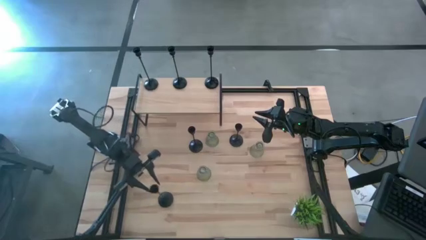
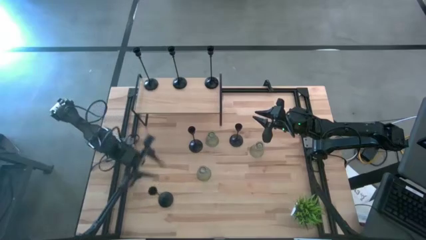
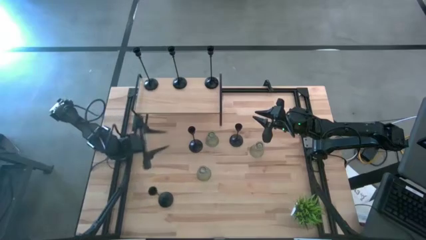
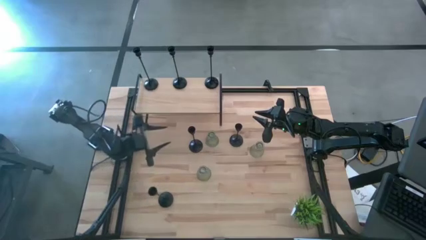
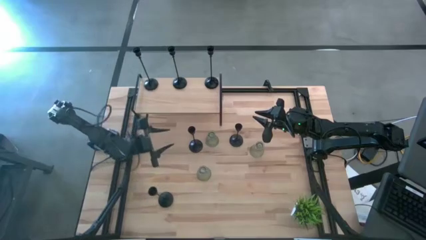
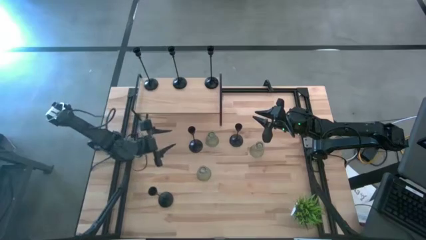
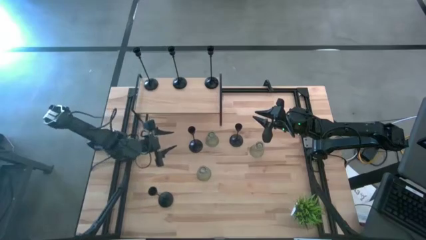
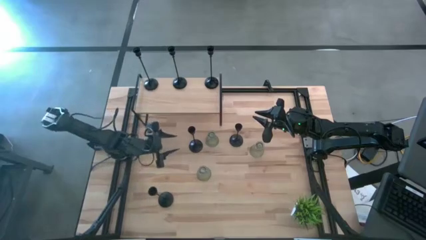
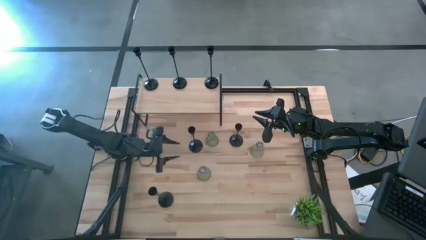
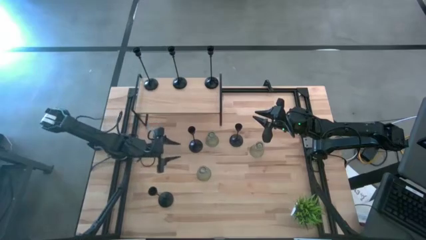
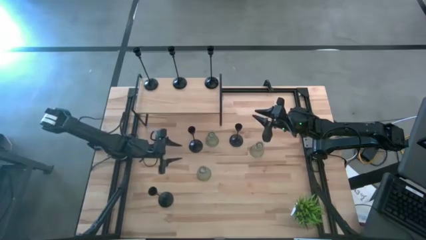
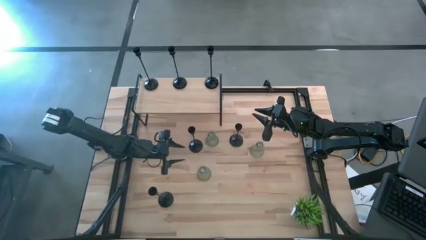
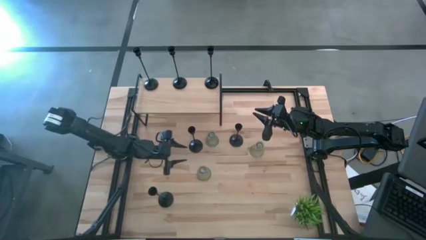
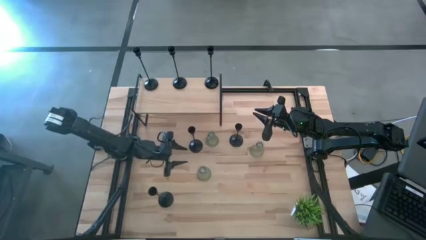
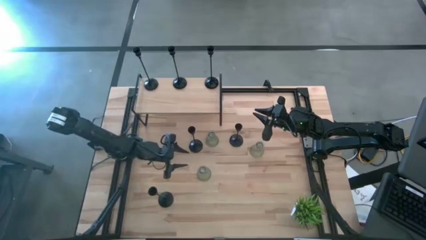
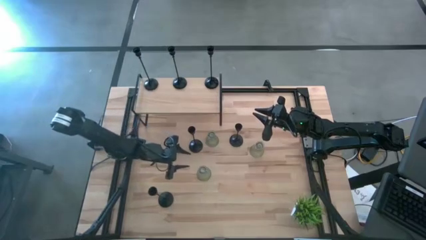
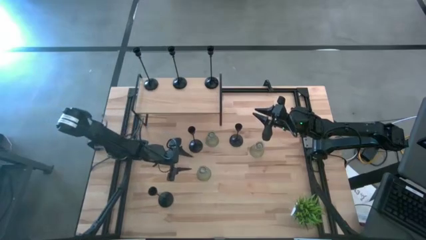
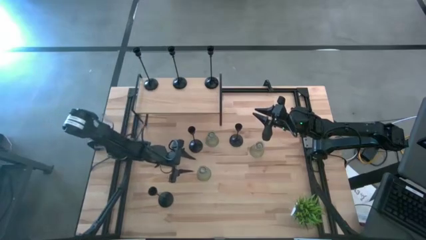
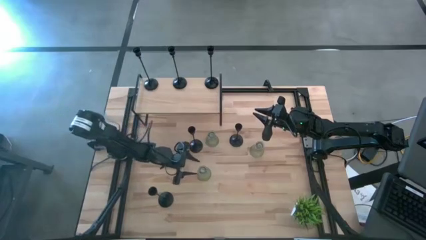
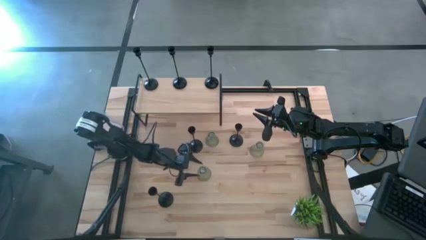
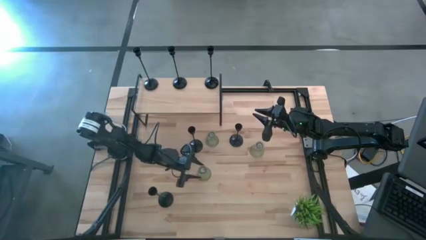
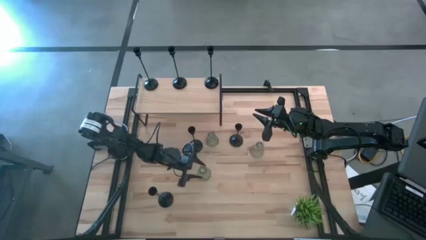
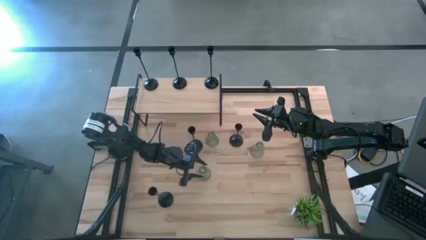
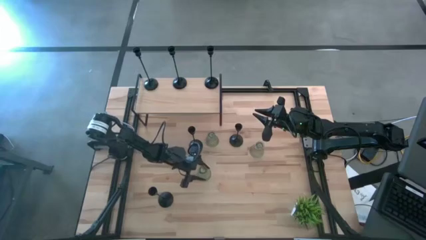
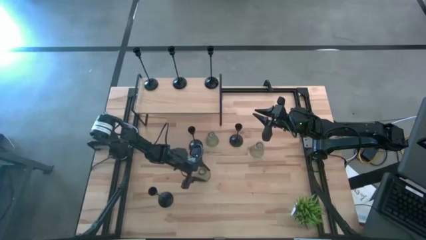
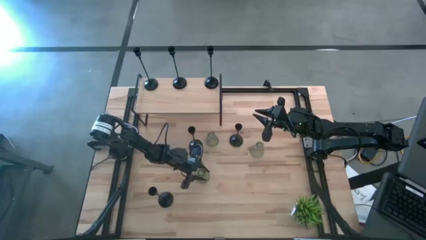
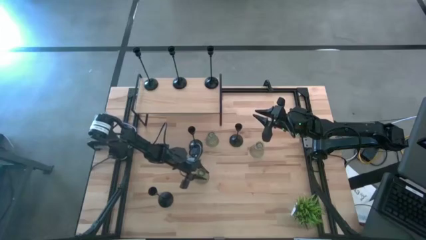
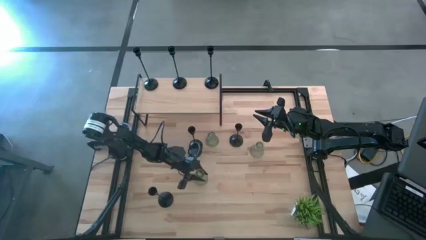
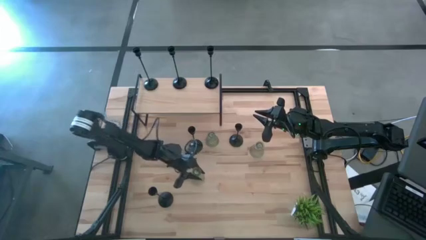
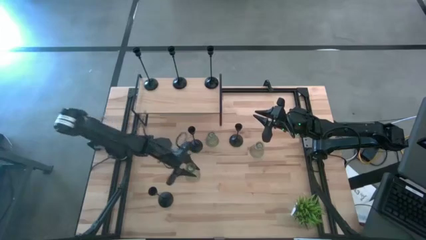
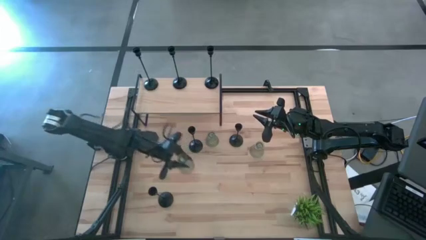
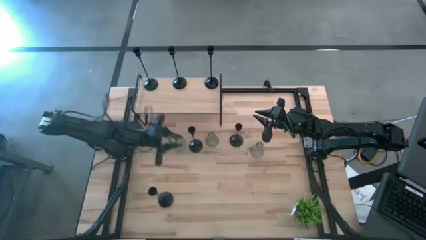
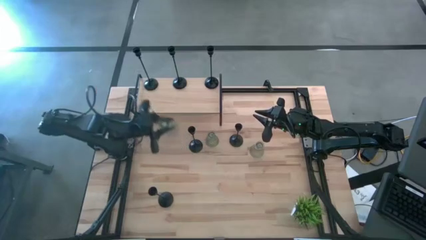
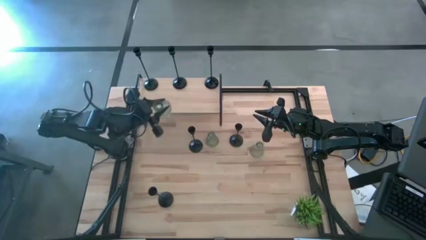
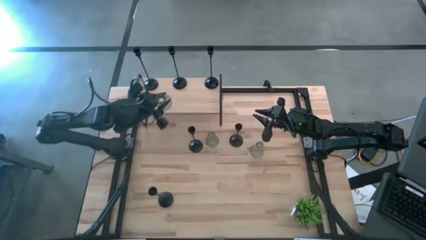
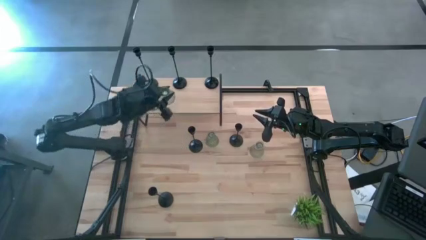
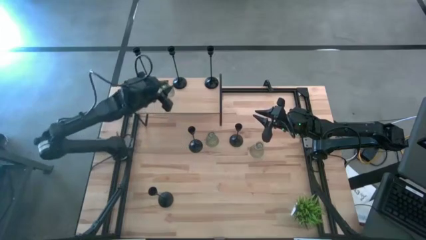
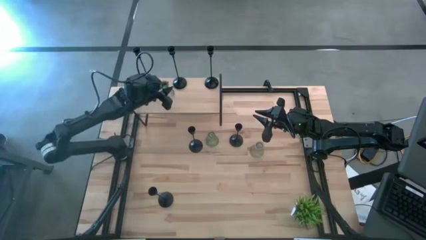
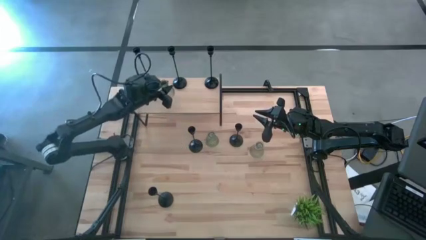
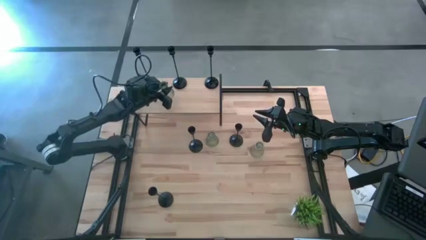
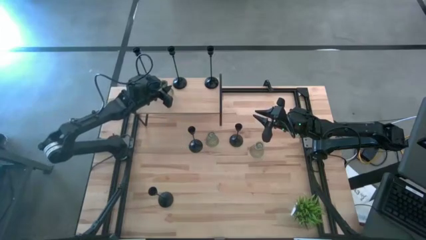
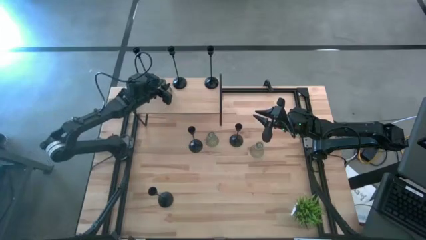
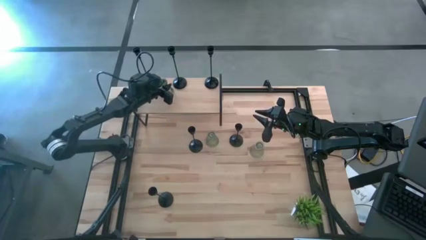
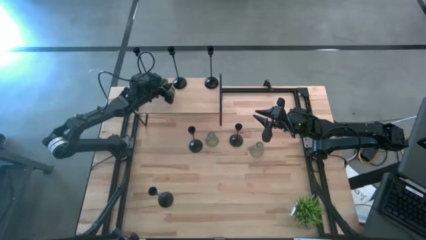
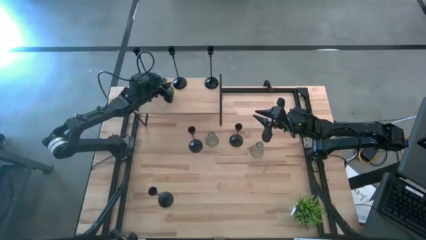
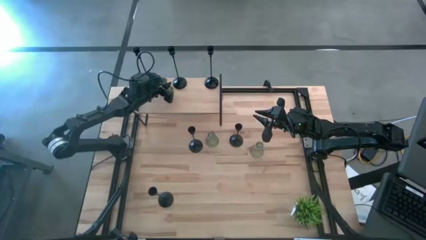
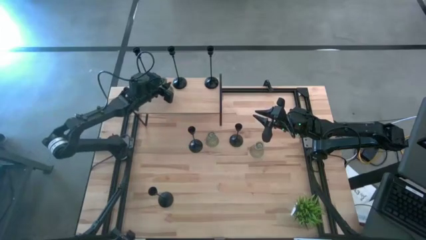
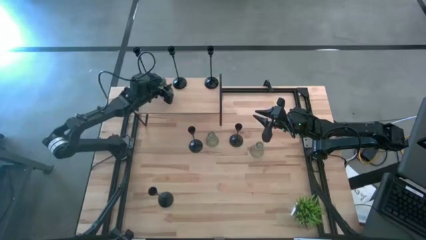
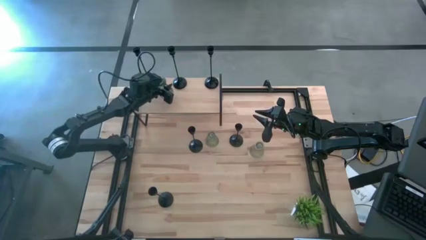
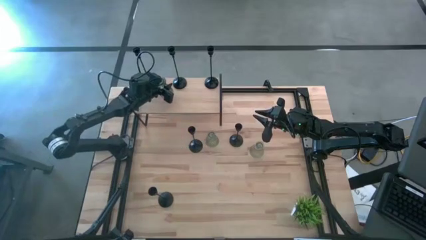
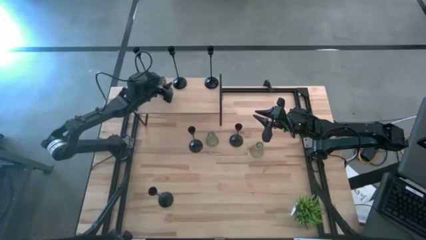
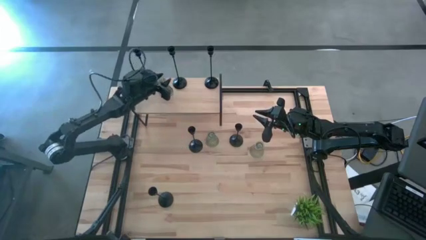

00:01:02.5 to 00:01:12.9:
Task: Pick & Place candle stick holders
Put the bottom left green glass candle holder on the shelf

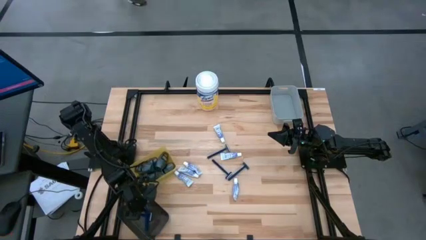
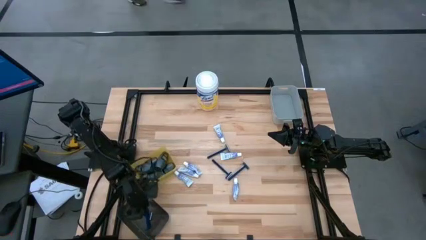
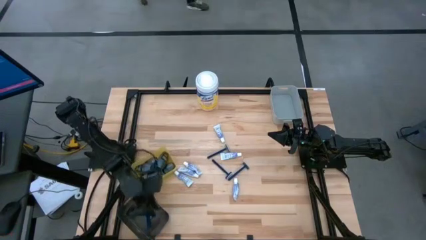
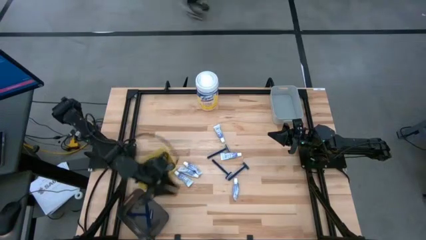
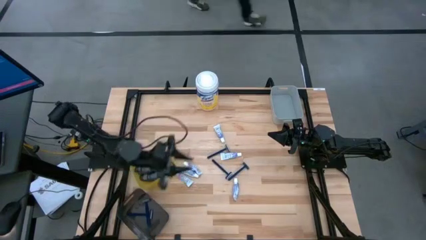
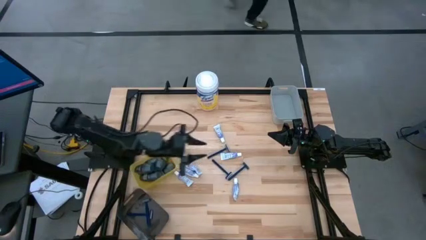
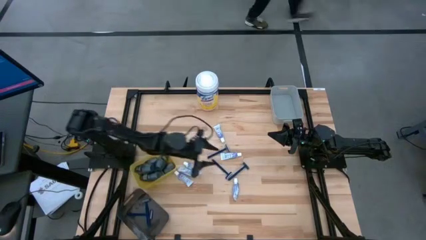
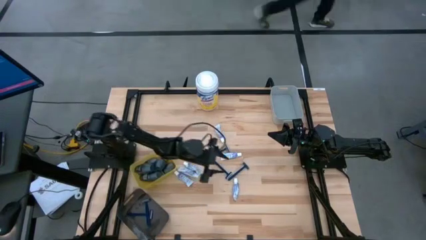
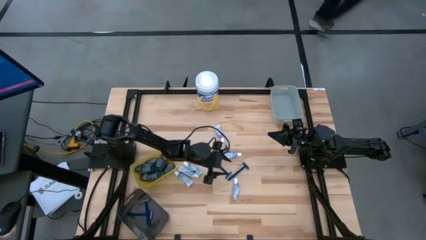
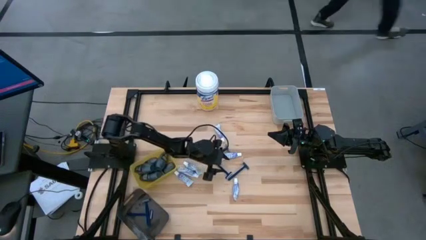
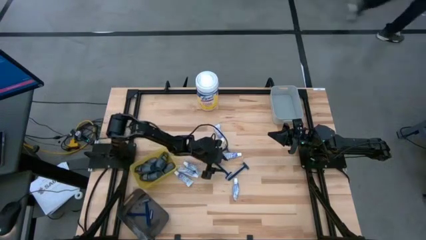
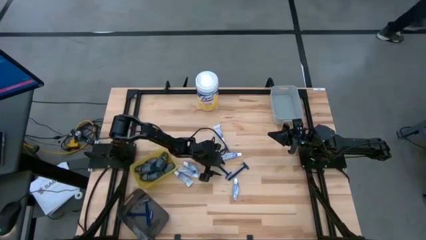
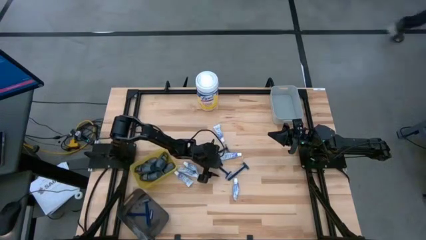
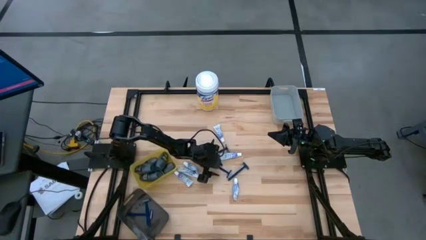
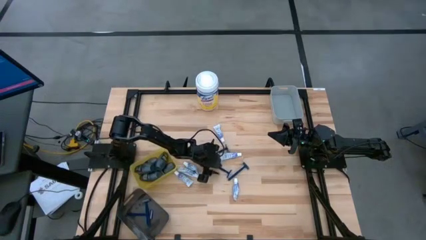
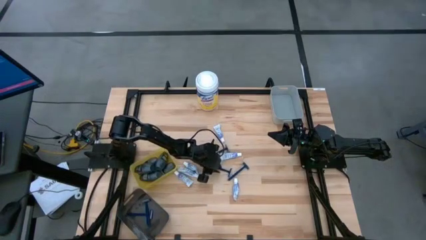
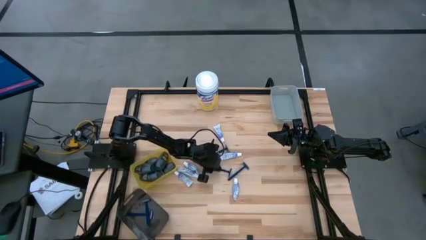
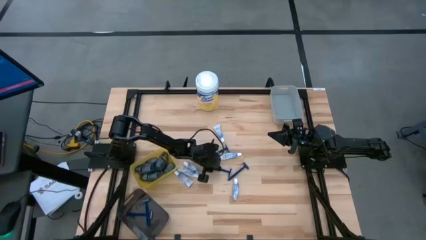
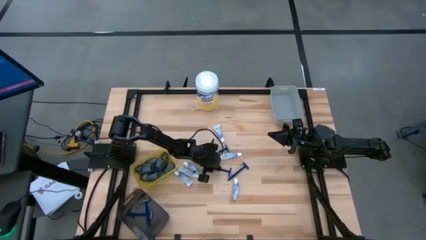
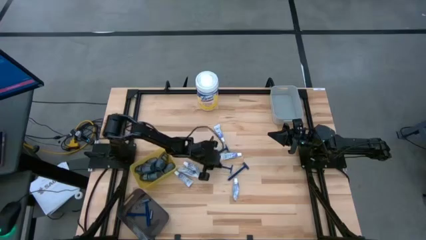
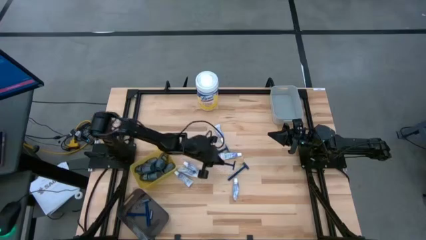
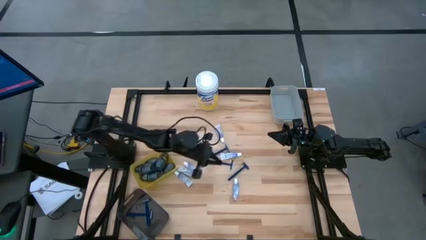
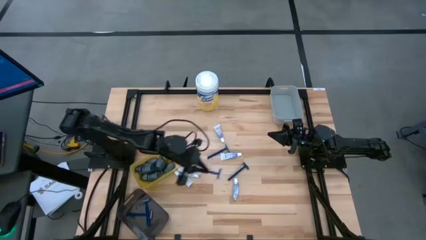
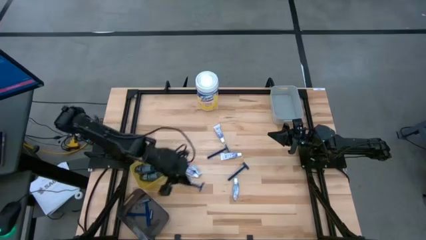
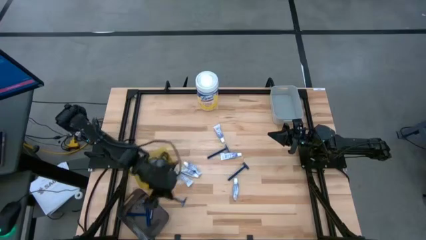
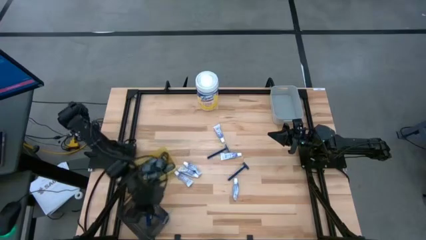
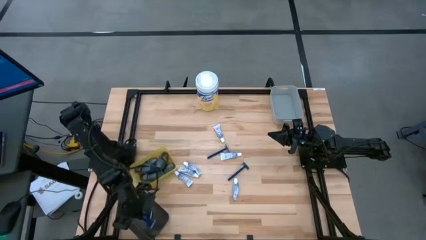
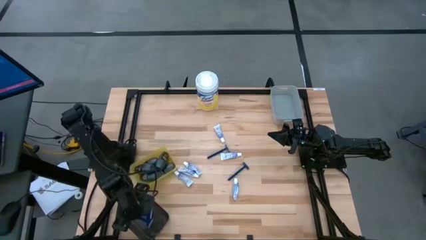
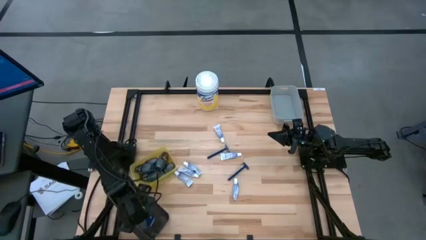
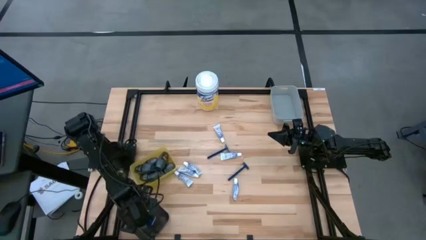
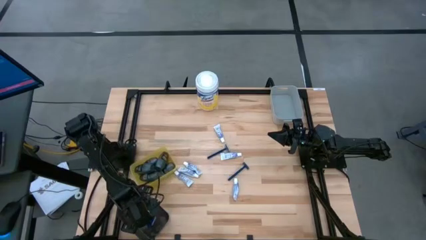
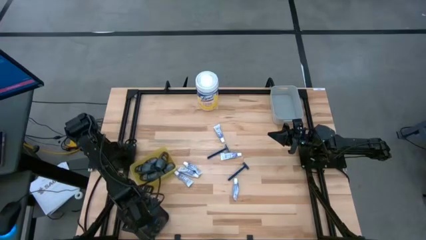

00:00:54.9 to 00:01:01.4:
Task: Pick & Place Travel size toiletries
Put the dark blue razor into the black bin
